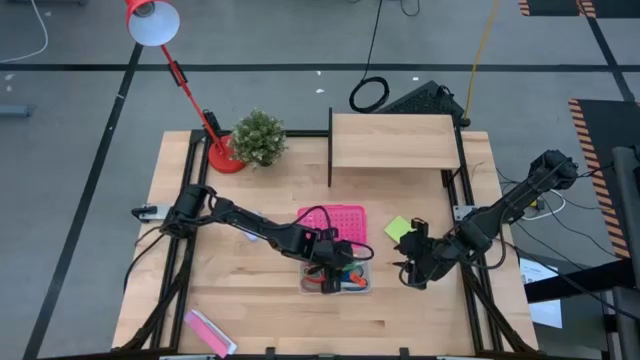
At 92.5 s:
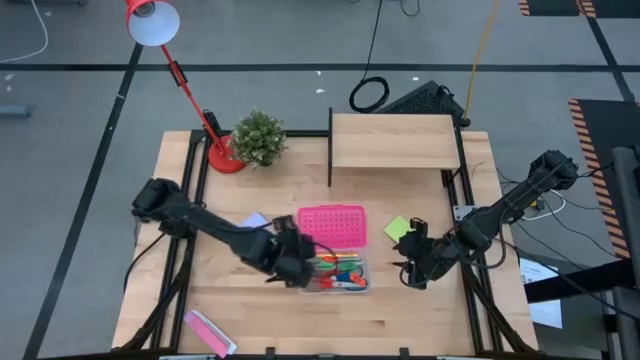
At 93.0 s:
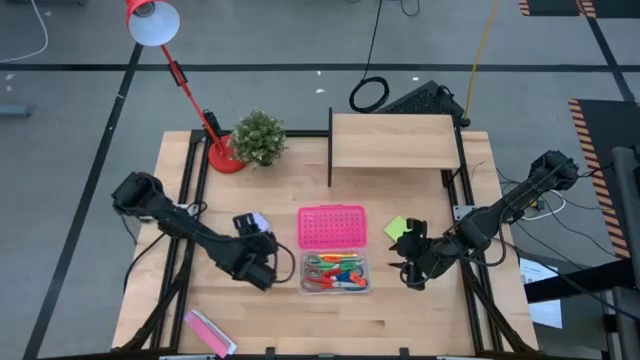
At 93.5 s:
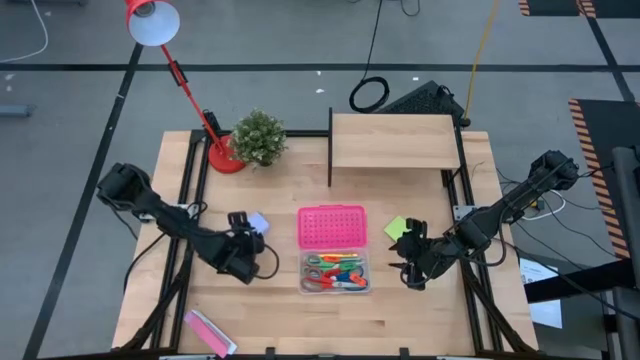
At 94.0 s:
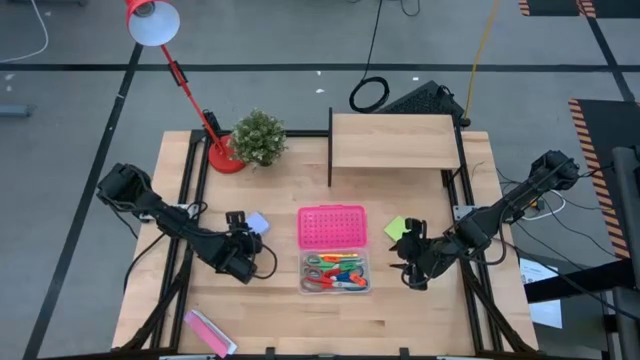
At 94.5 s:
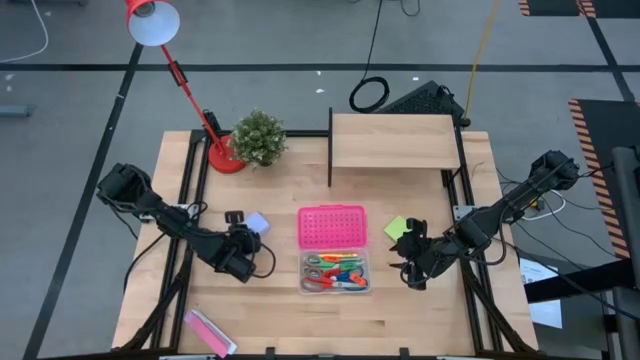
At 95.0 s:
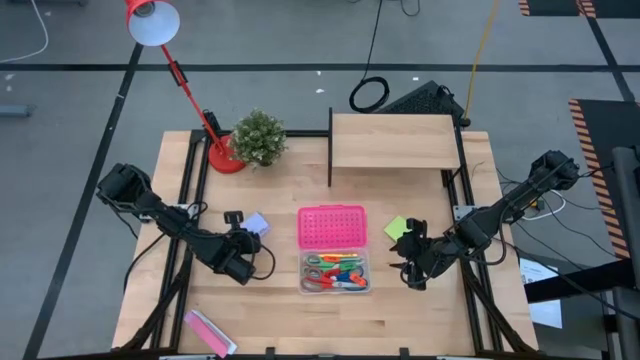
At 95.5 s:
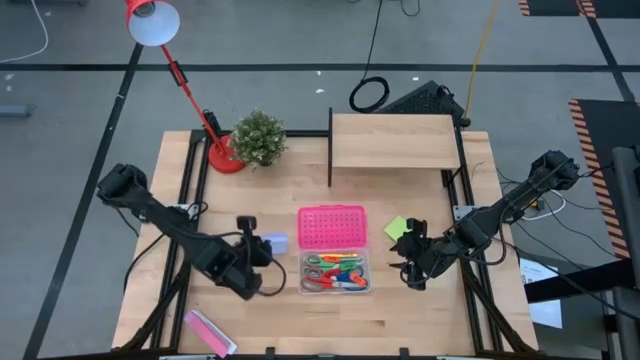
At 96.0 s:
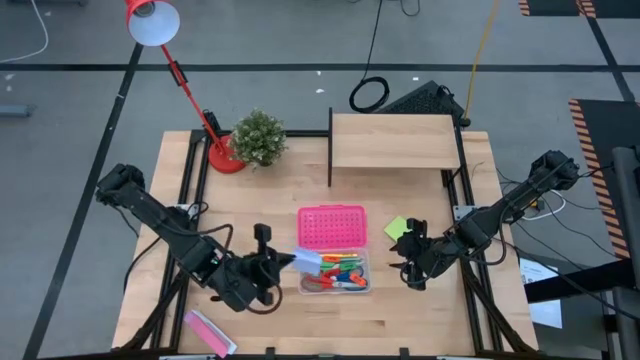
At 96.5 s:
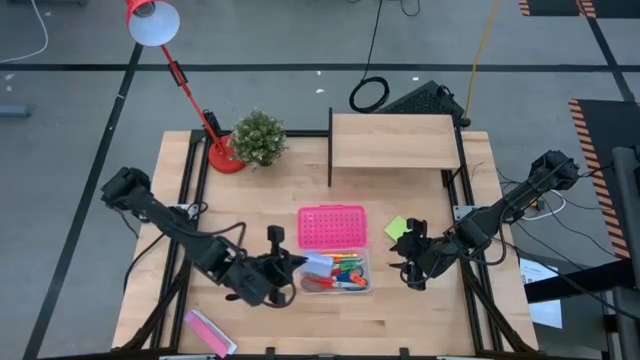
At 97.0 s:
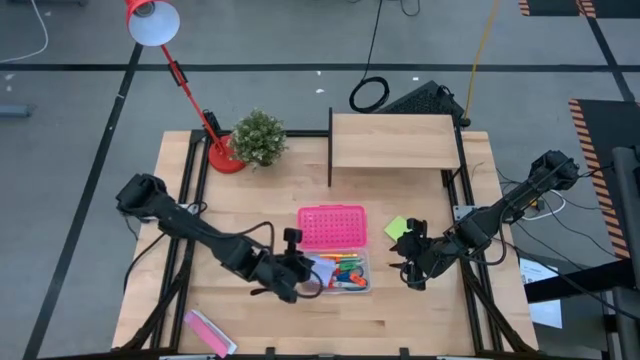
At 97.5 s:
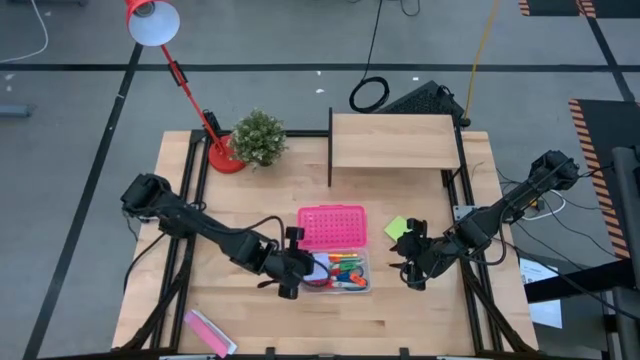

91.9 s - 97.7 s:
Task: Pack school essentials
Put the white sticky notes into the pink supply box

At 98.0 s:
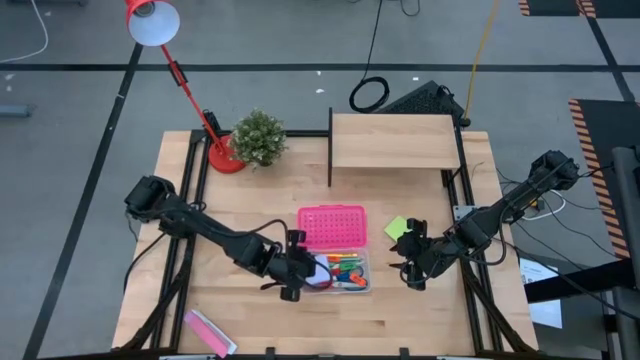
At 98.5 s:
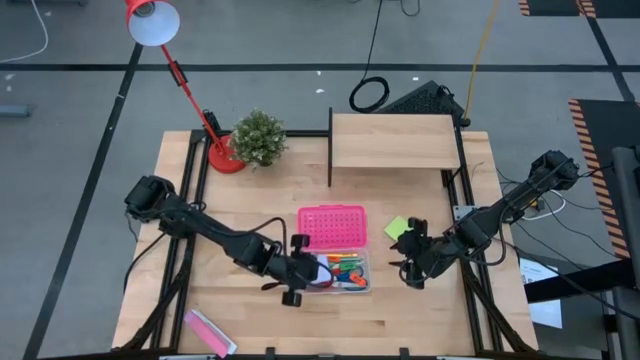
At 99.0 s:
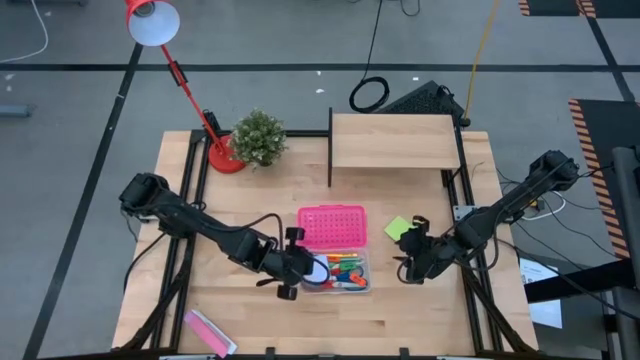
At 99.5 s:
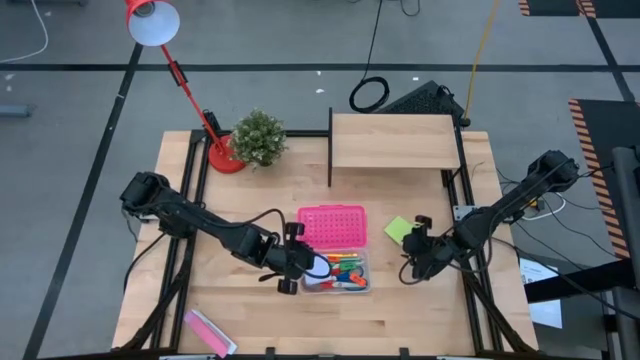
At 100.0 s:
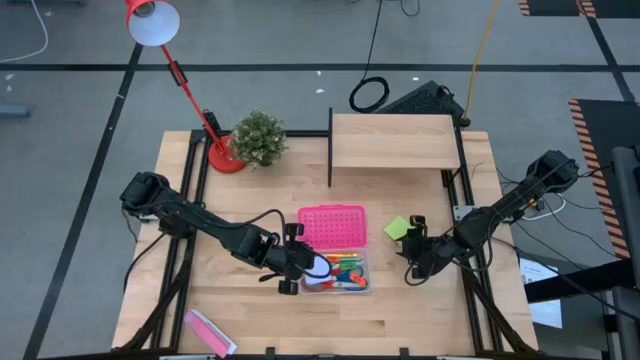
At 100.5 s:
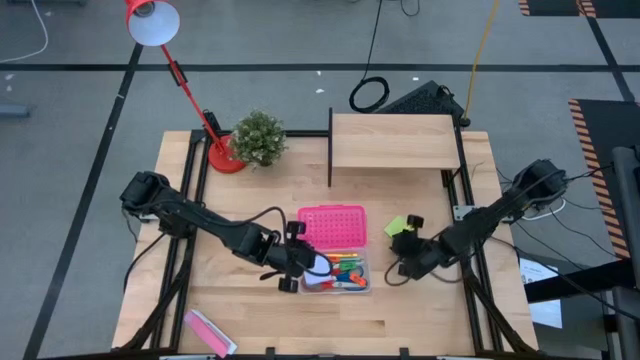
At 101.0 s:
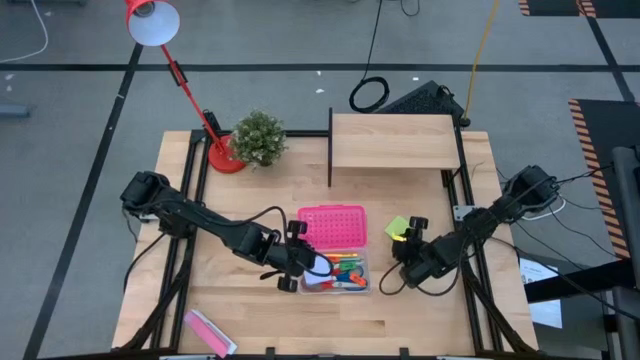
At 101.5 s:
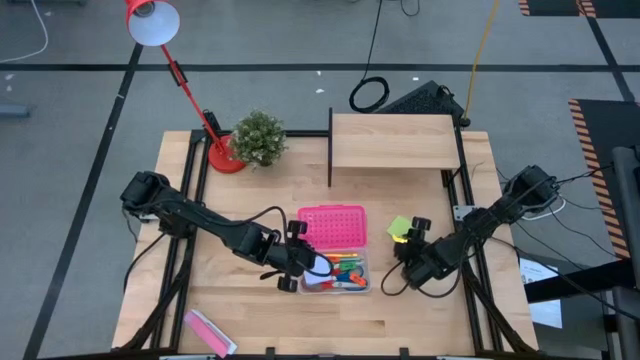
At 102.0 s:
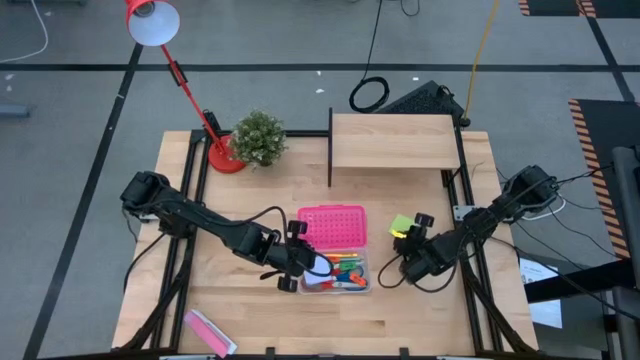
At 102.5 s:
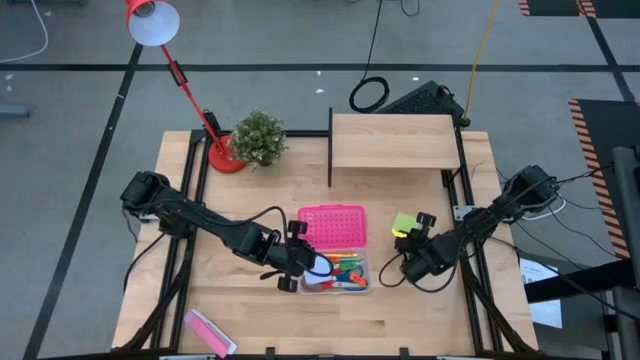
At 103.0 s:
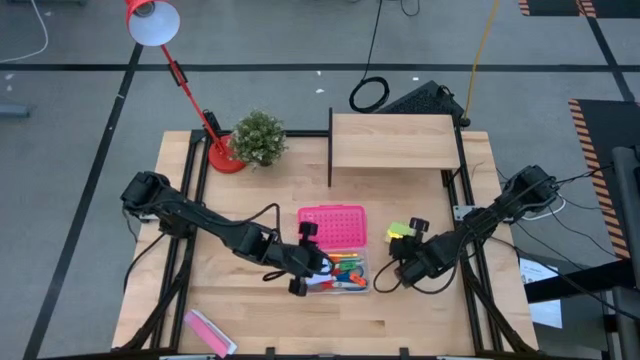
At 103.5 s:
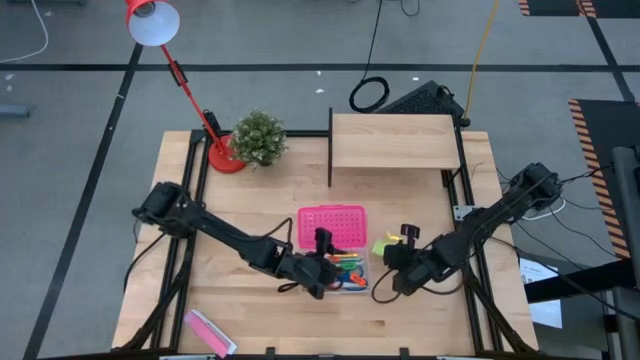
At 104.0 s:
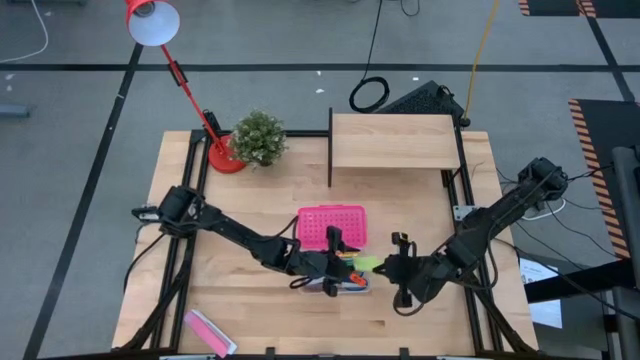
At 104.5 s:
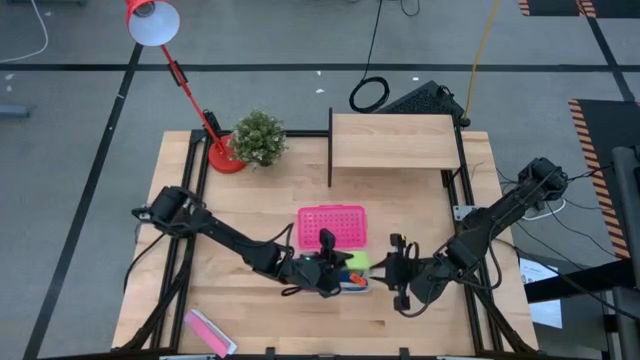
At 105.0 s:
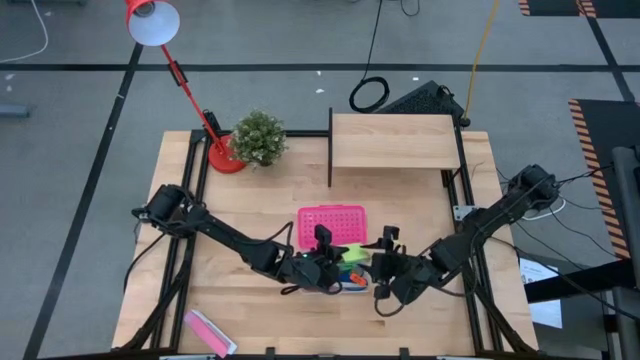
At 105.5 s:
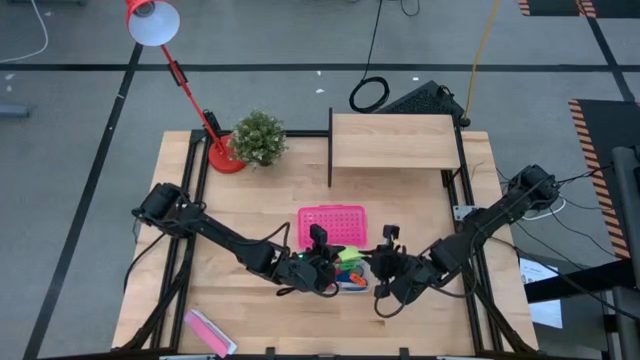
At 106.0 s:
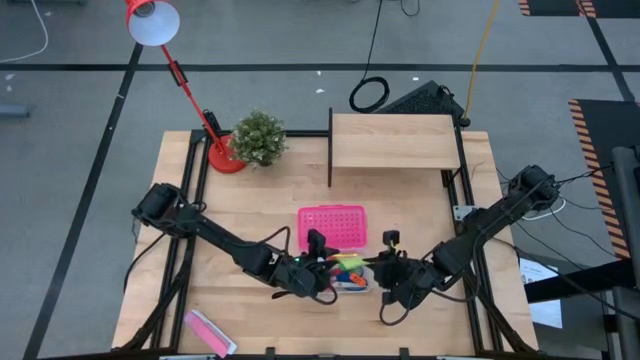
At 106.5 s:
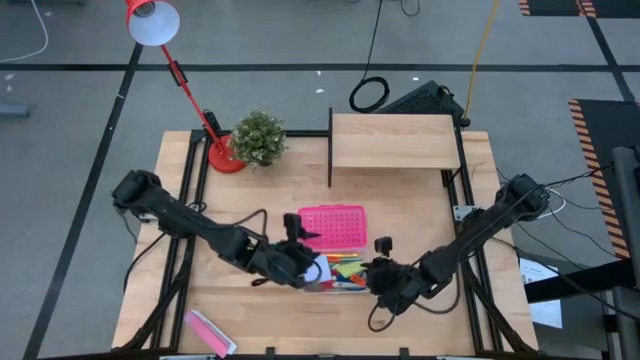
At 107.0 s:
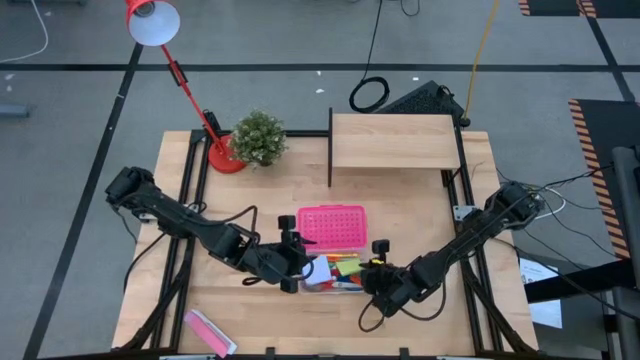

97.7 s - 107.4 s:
Put the green sticky notes into the supply box

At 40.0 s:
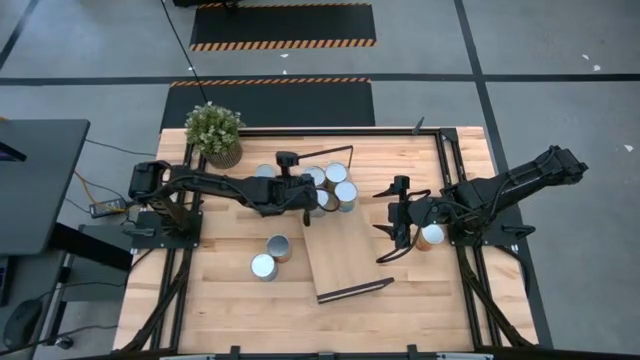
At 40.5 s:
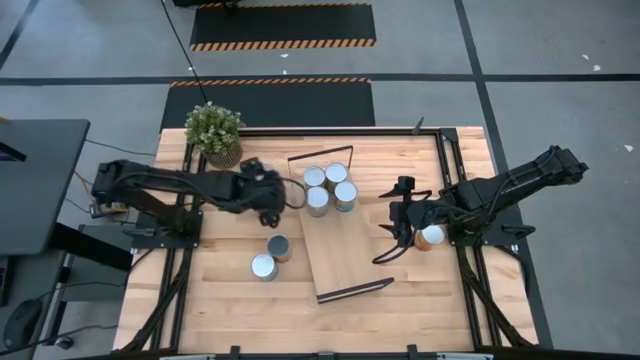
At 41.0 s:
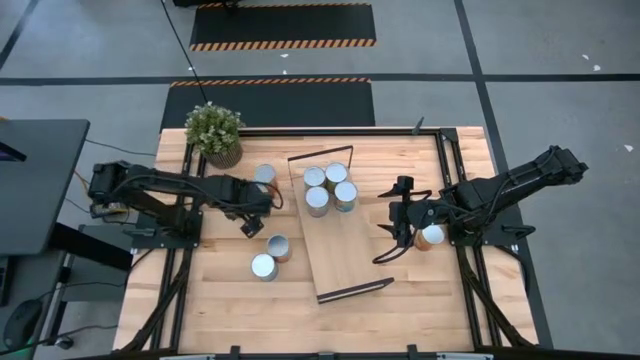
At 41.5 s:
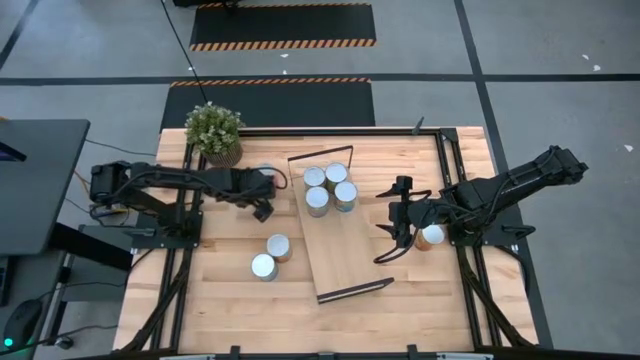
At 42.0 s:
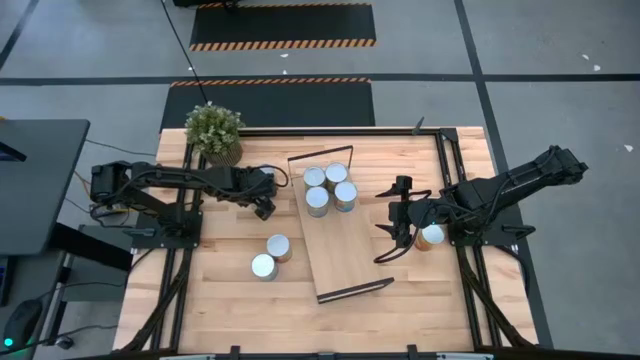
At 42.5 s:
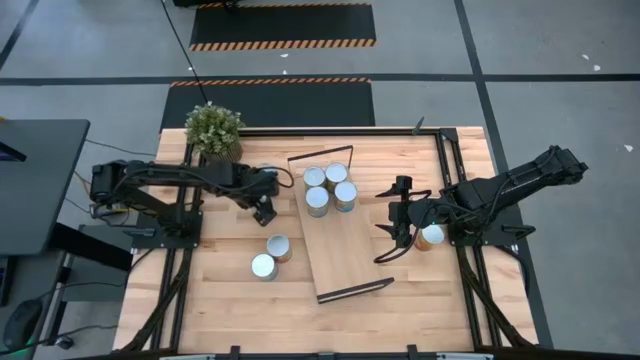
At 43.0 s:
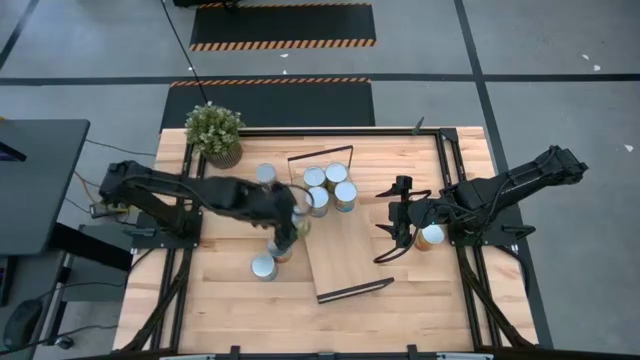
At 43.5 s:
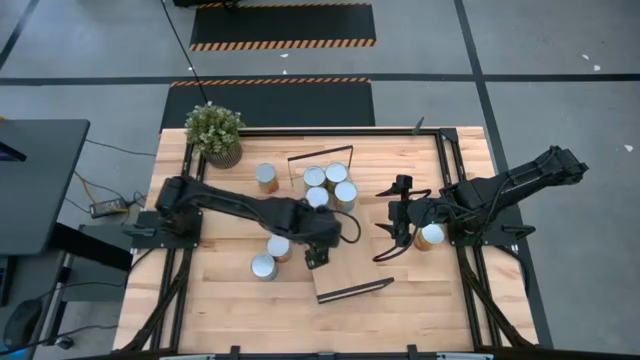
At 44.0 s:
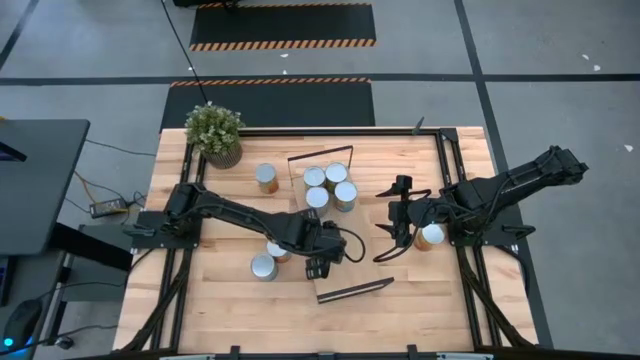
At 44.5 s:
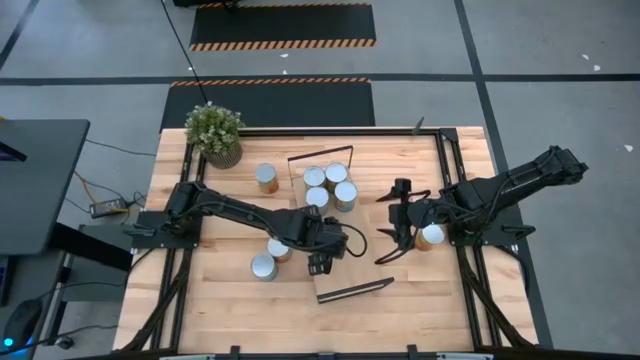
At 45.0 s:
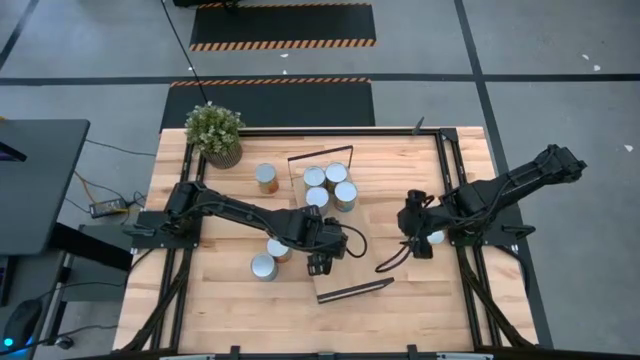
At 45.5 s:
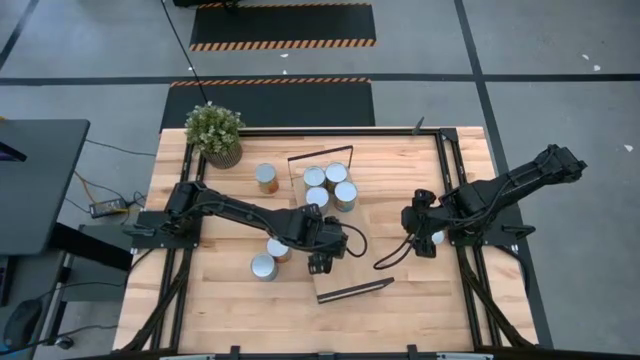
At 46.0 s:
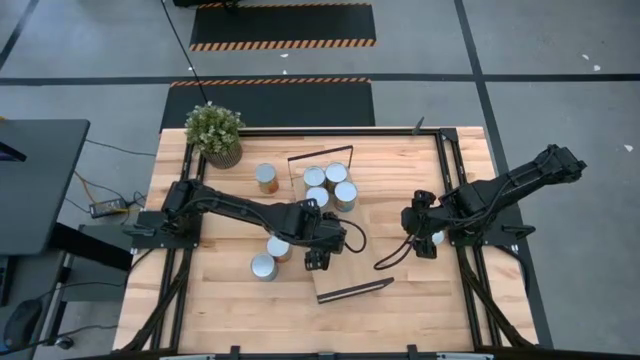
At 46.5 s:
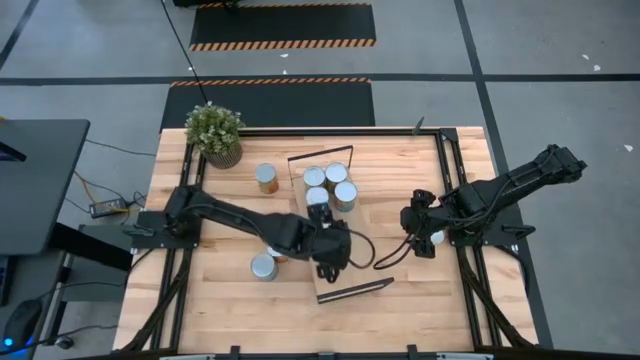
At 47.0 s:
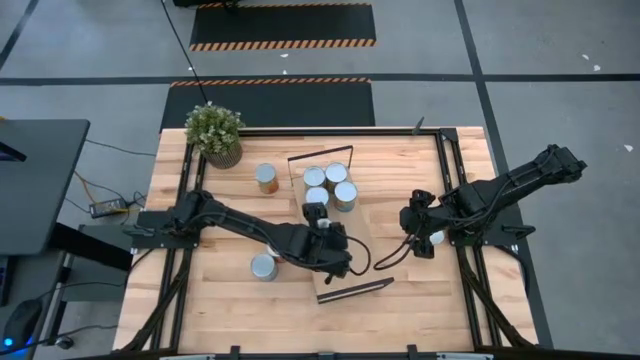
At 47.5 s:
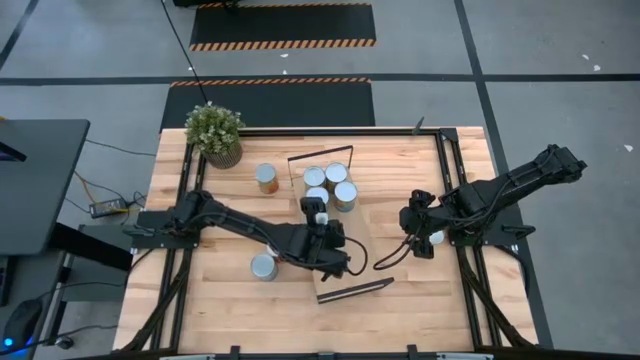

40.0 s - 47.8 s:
Task: Pick and place cans onto a shelf
Put the canned pears on the shelf
